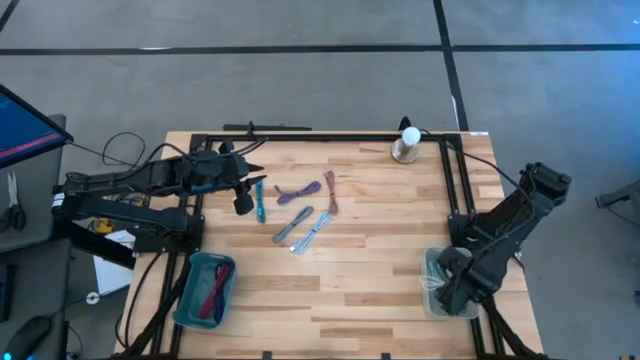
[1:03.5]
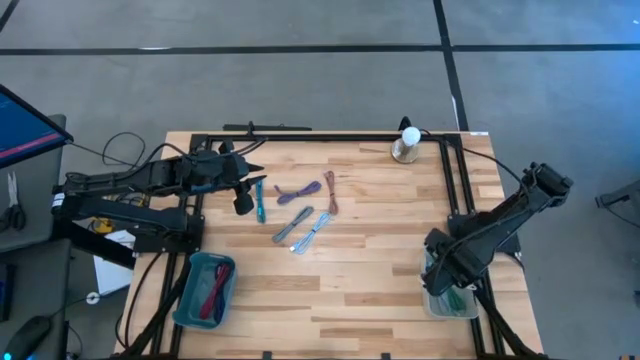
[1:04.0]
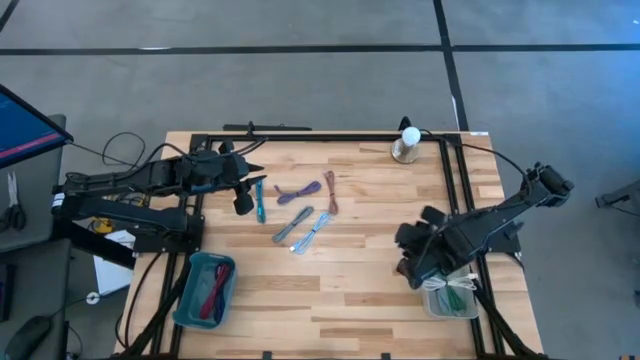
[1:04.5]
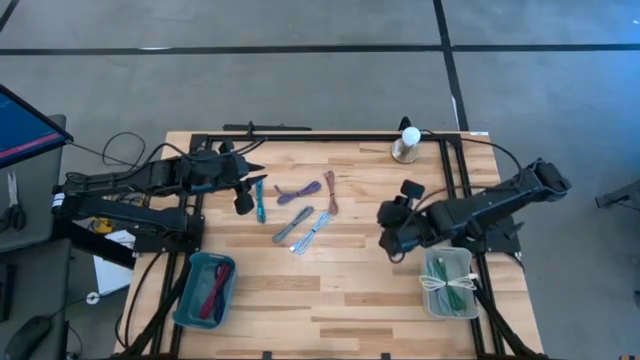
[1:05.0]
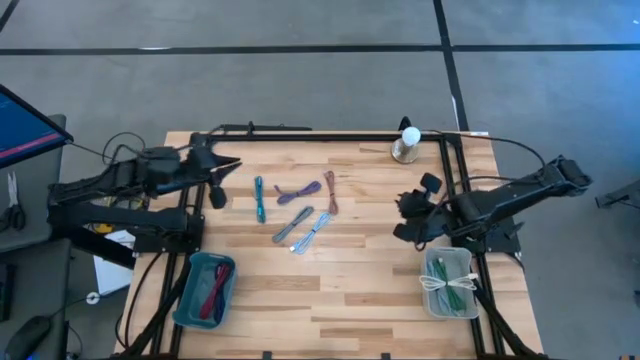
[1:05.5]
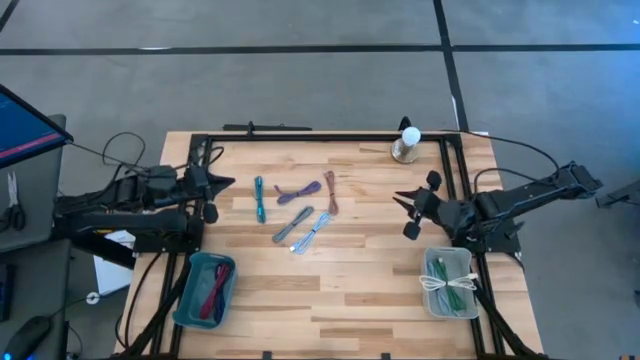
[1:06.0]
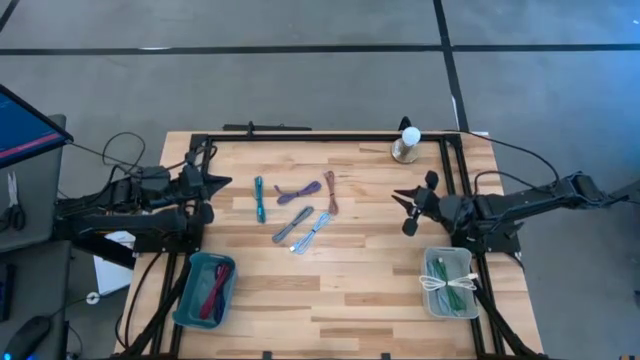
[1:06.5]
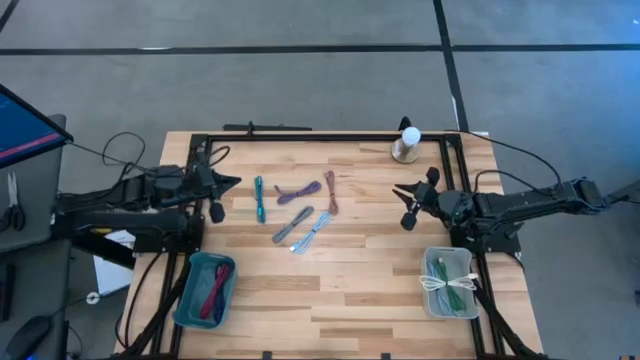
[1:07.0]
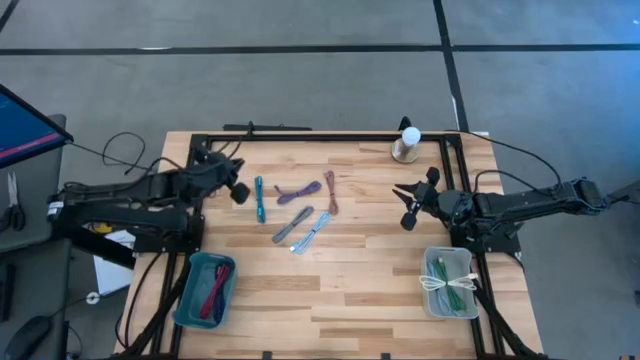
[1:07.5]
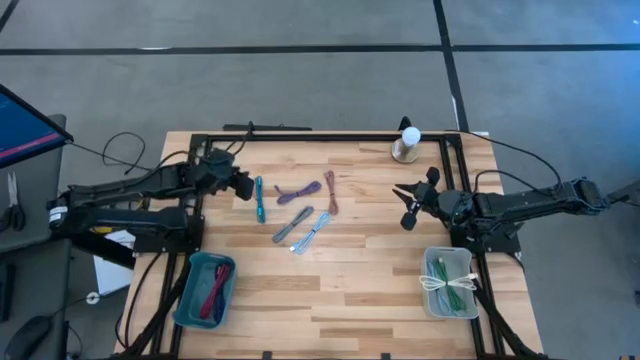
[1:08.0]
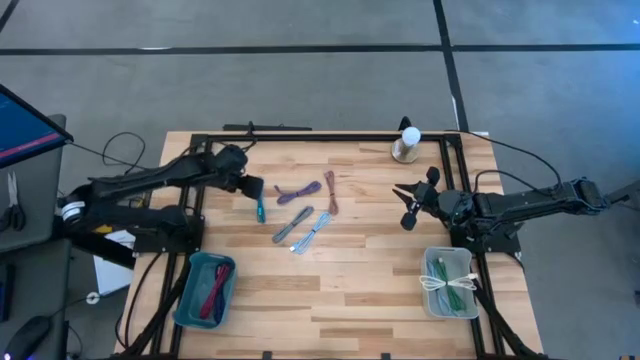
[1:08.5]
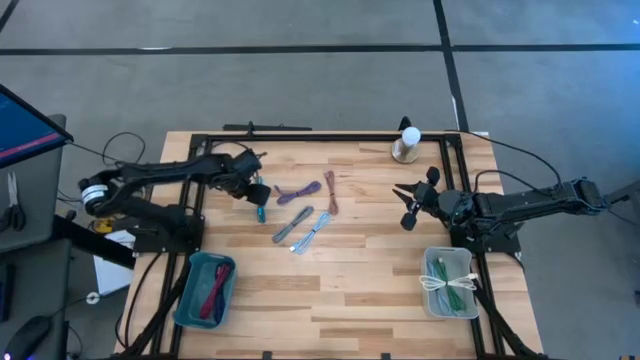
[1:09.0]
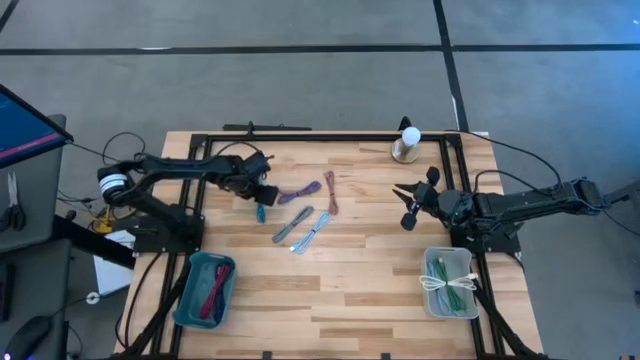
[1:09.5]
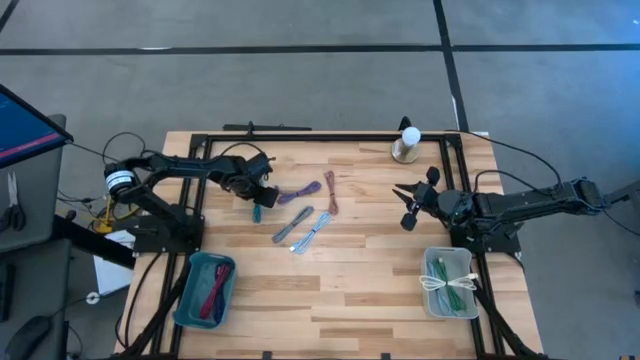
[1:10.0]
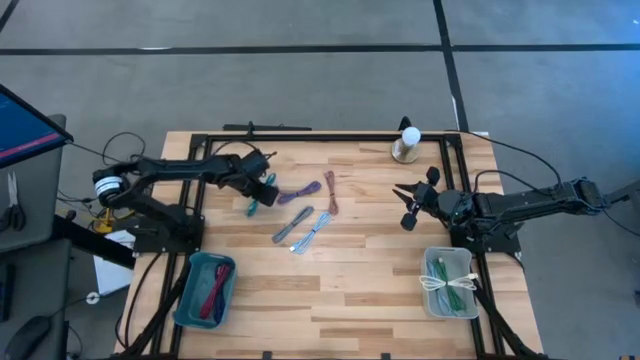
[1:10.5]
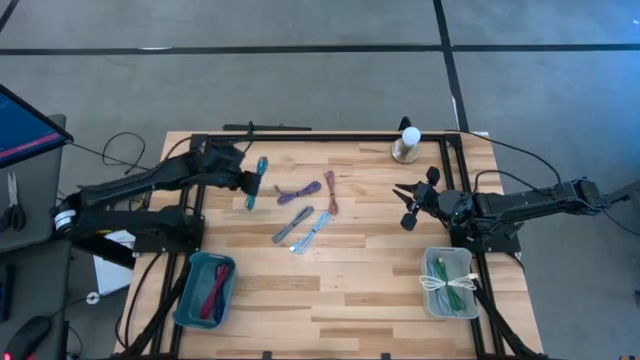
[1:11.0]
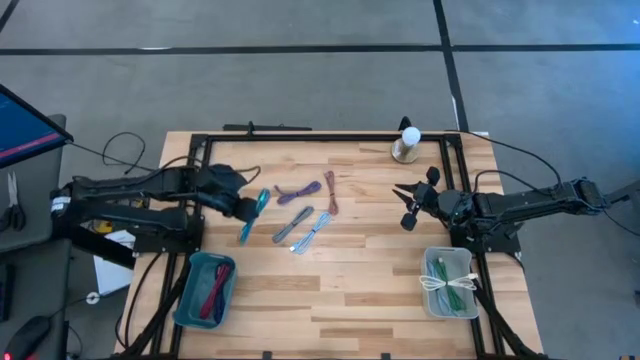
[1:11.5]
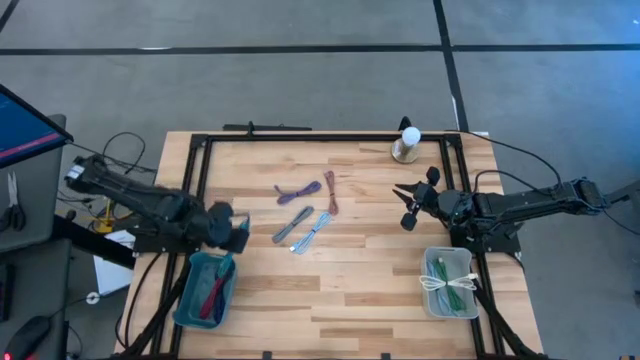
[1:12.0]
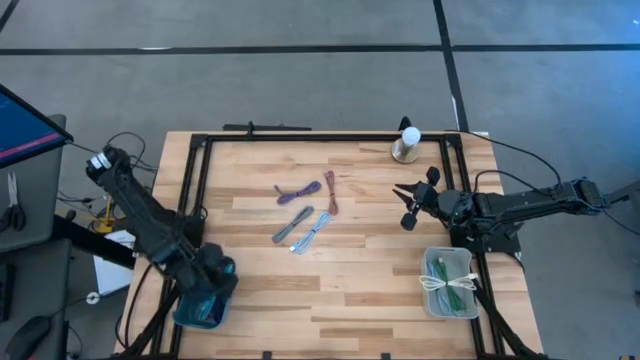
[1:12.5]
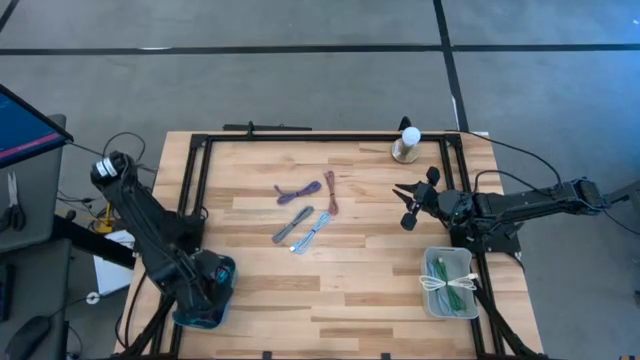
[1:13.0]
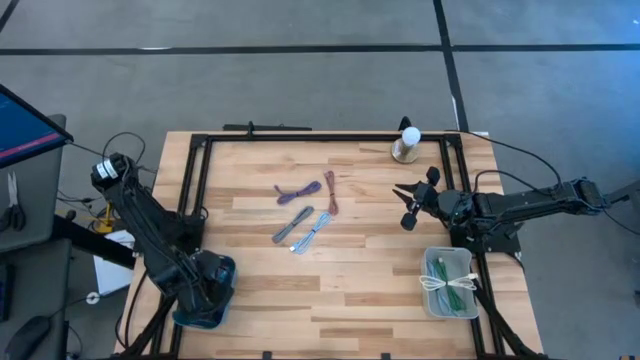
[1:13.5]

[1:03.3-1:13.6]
Task: Pick & Place USB Port
Put the light blue patterned USB cable into the blue bin

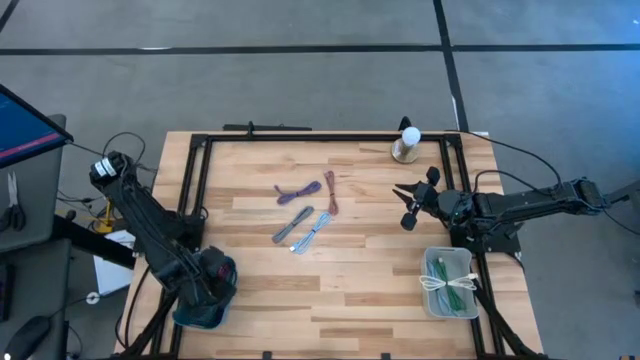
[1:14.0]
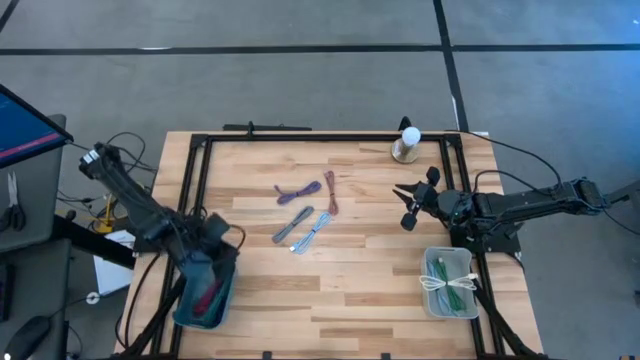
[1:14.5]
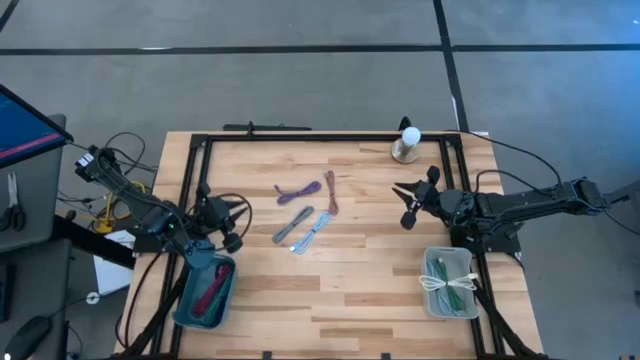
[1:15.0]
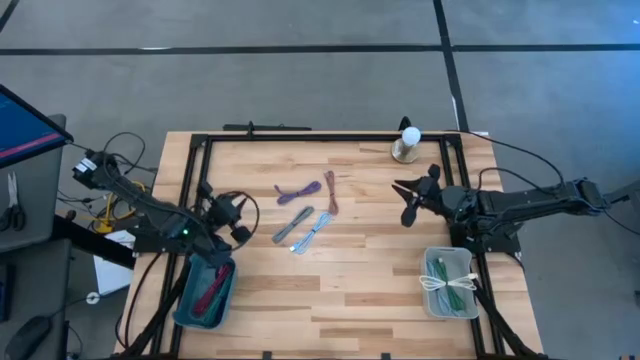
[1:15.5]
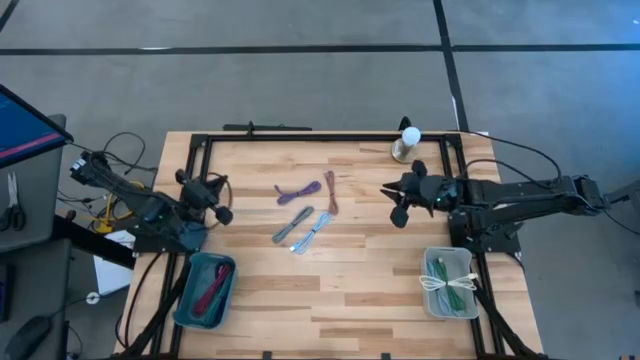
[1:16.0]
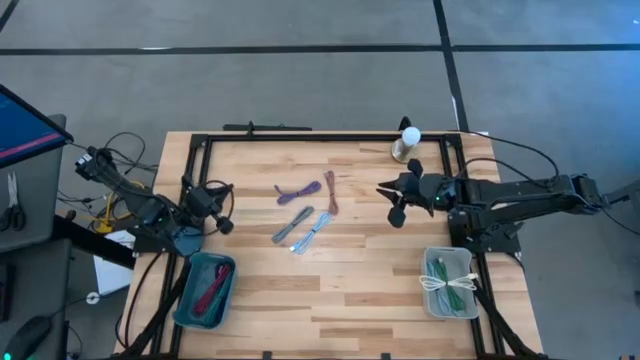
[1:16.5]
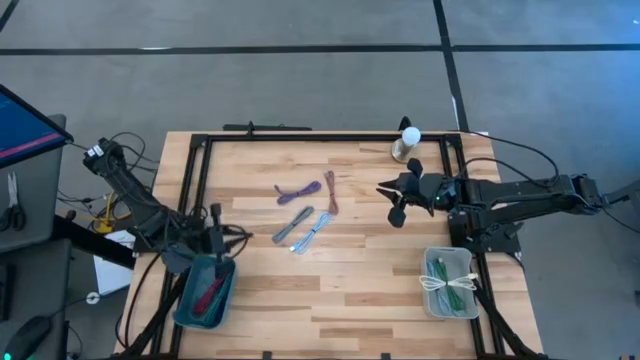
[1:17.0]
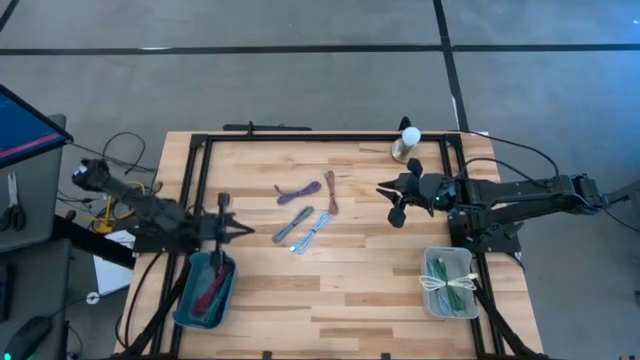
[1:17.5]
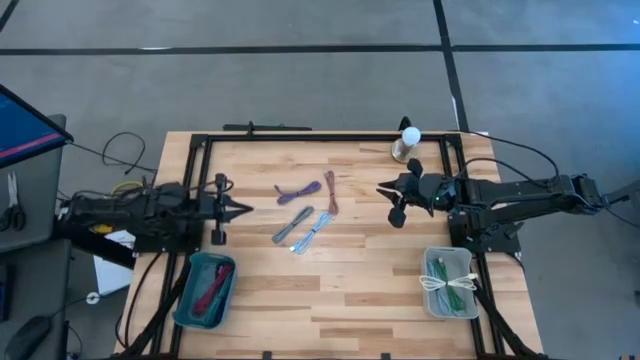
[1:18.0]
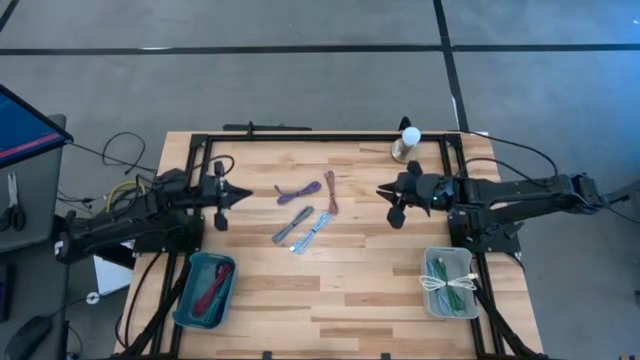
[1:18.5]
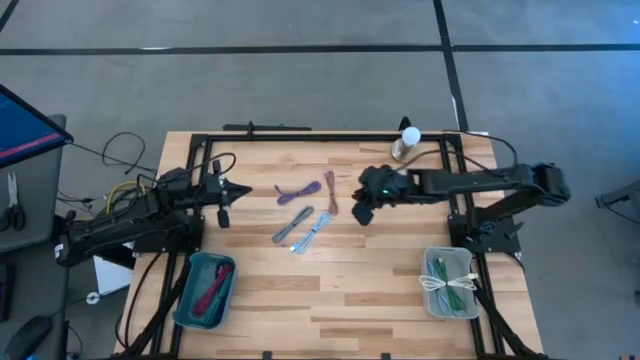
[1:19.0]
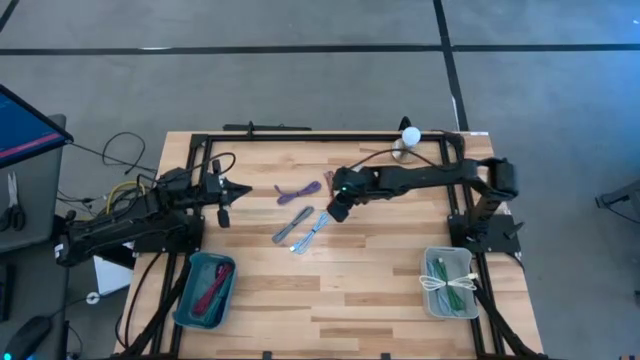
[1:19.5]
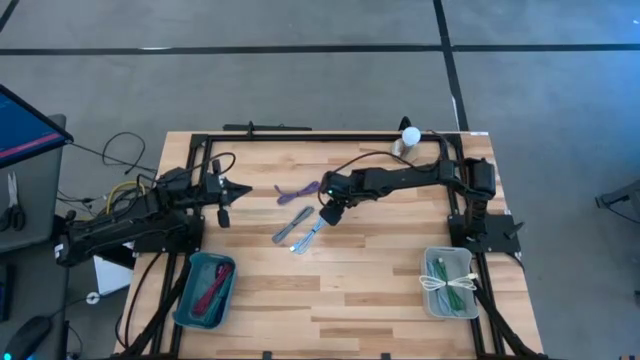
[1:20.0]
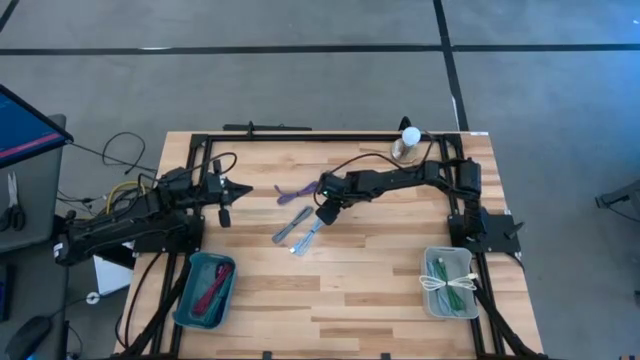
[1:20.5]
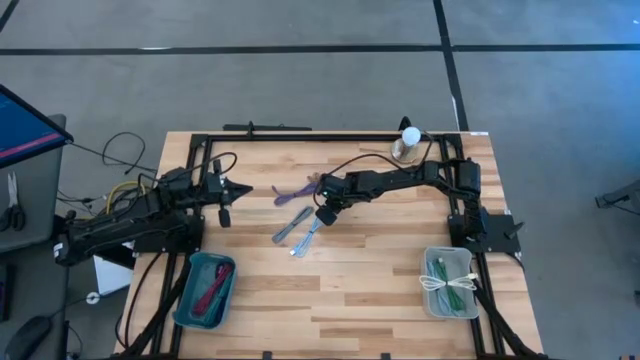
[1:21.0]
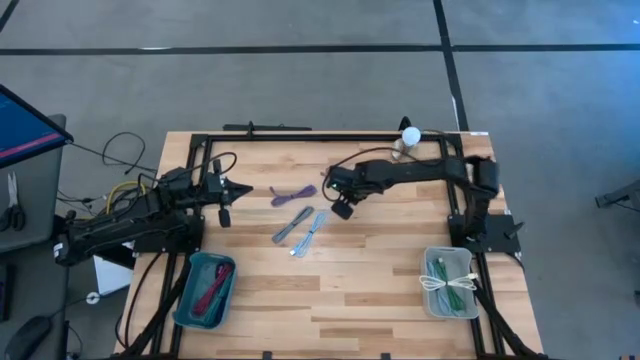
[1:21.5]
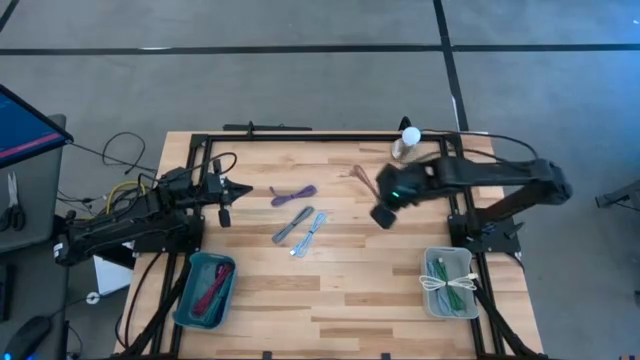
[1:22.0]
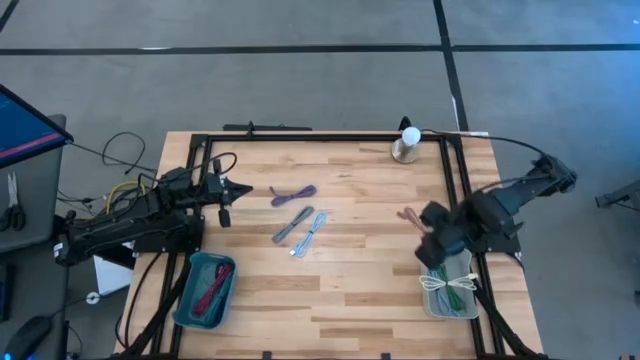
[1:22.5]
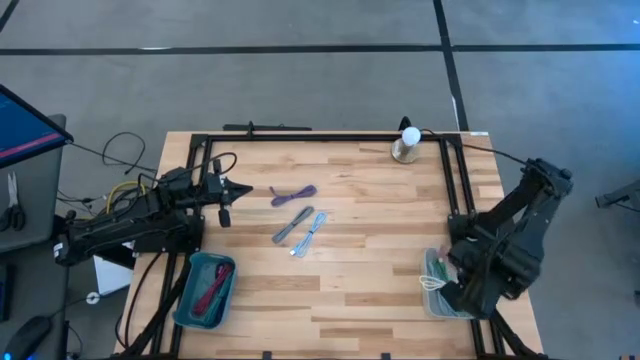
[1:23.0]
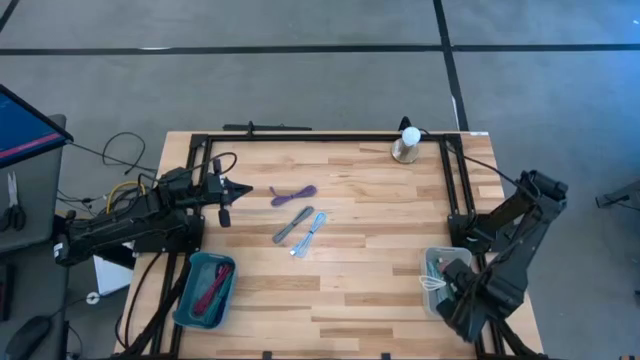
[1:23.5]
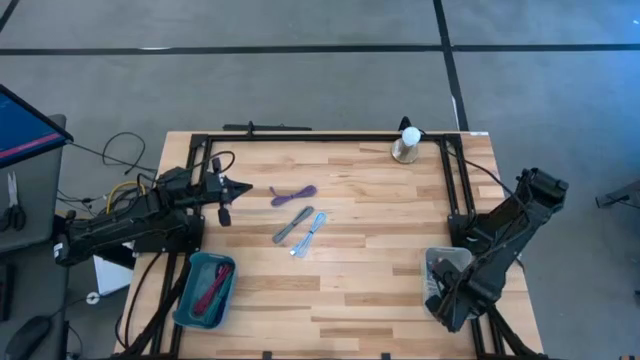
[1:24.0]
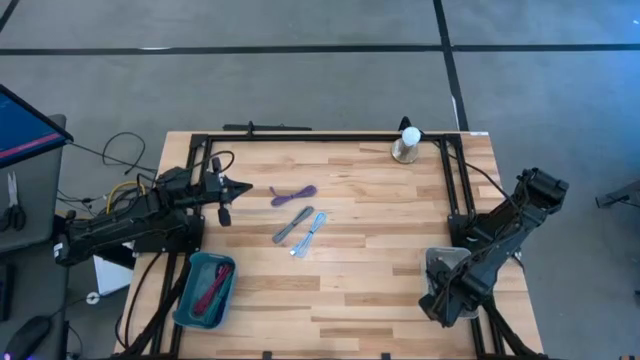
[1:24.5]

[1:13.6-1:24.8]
Put the pink USB cable into the gray bin
